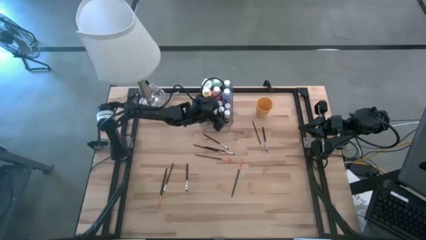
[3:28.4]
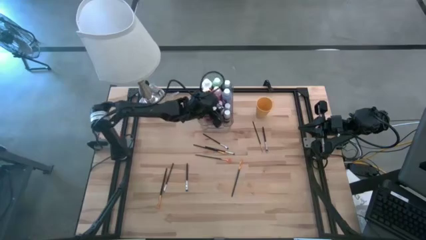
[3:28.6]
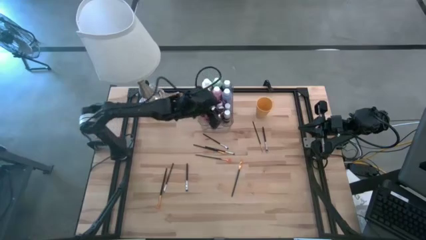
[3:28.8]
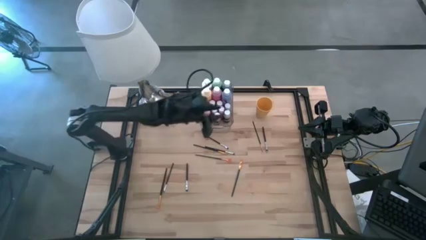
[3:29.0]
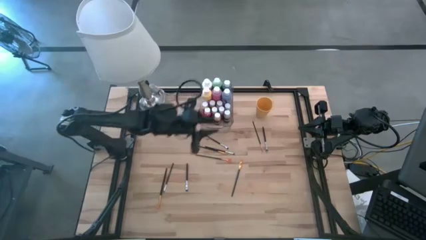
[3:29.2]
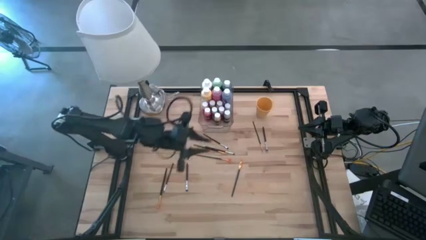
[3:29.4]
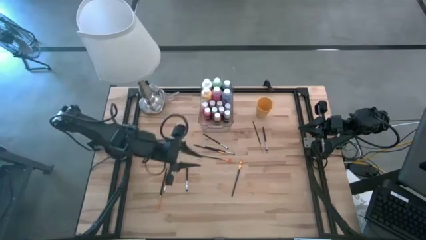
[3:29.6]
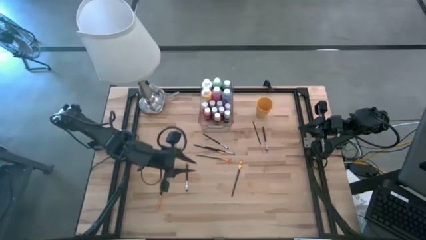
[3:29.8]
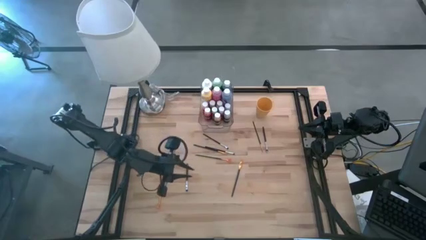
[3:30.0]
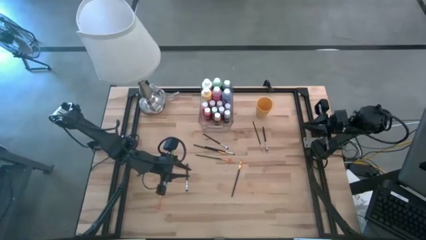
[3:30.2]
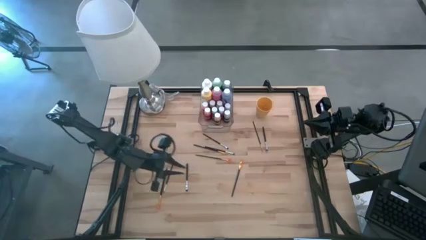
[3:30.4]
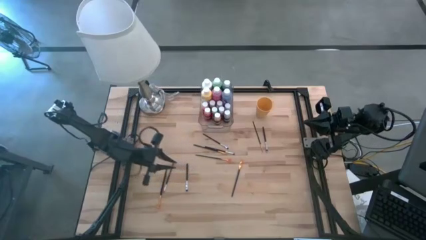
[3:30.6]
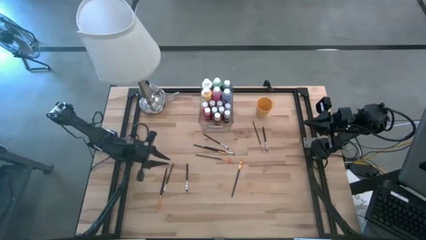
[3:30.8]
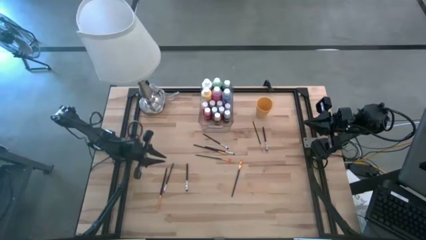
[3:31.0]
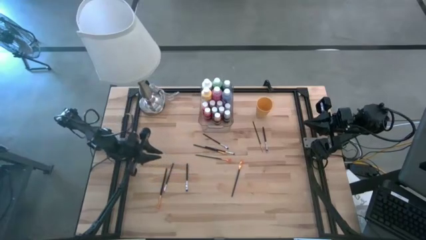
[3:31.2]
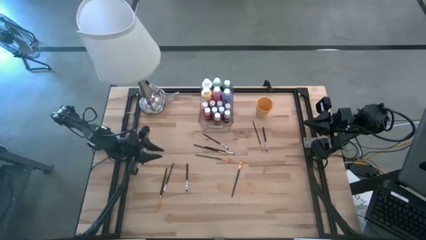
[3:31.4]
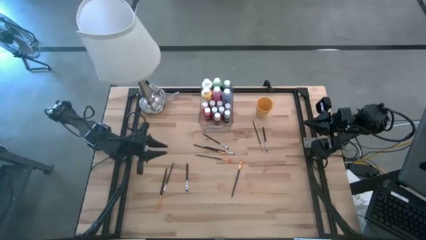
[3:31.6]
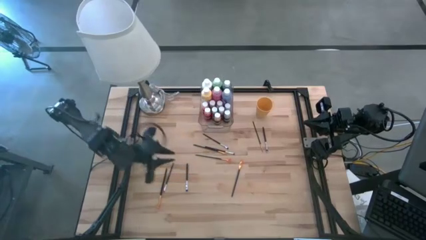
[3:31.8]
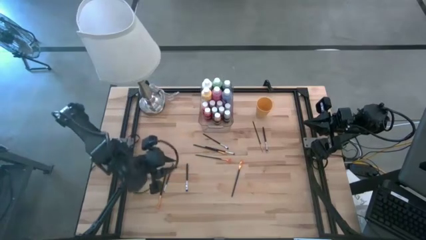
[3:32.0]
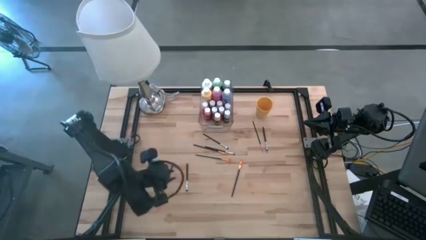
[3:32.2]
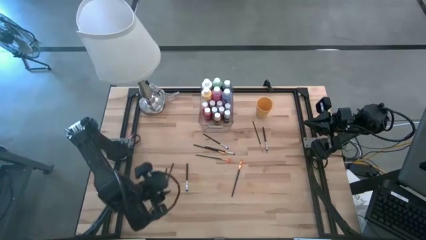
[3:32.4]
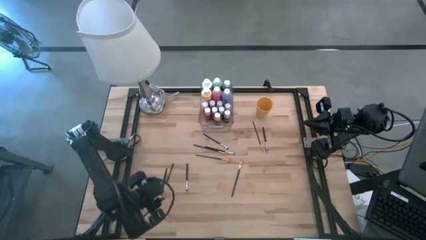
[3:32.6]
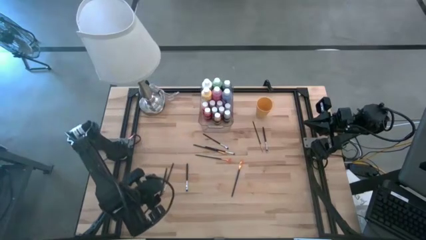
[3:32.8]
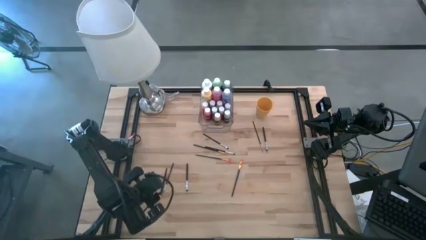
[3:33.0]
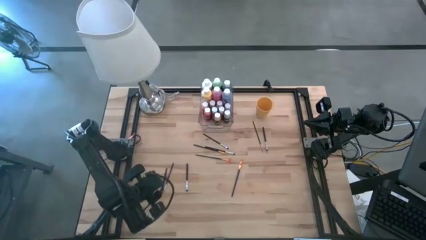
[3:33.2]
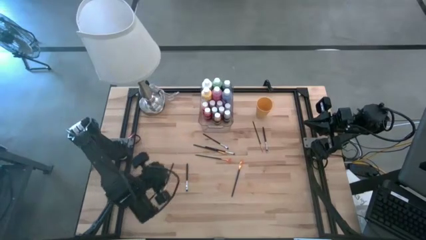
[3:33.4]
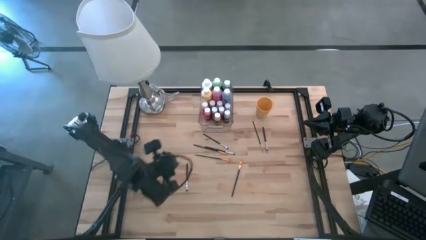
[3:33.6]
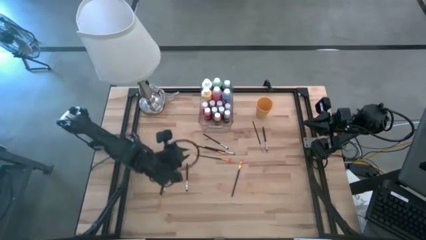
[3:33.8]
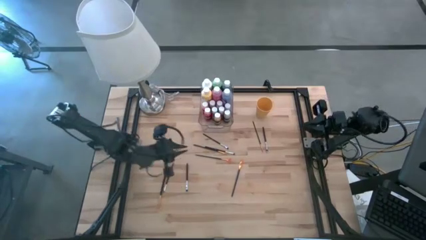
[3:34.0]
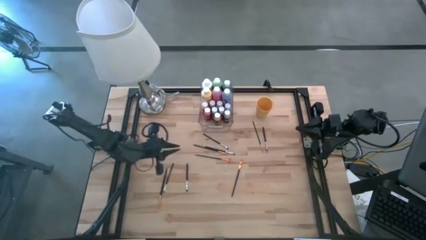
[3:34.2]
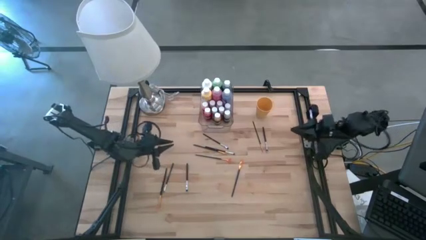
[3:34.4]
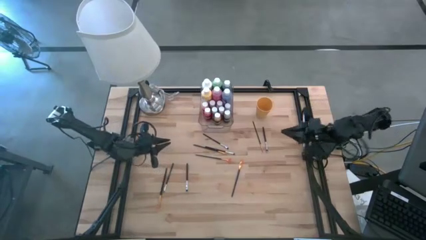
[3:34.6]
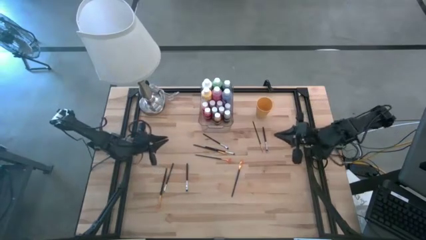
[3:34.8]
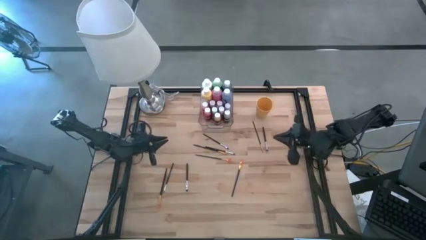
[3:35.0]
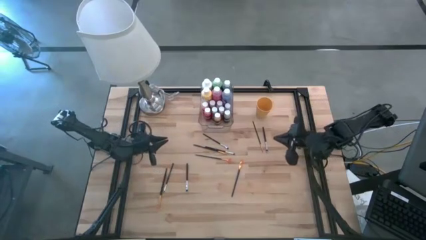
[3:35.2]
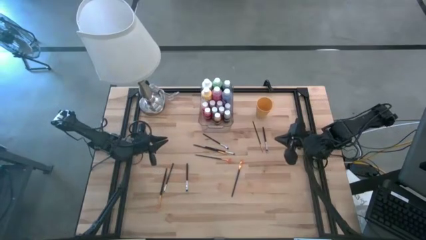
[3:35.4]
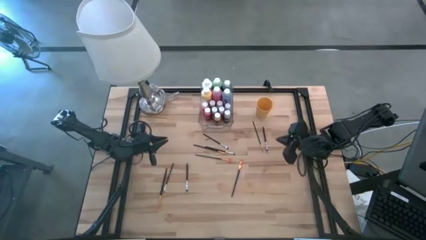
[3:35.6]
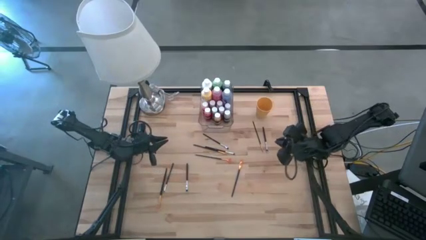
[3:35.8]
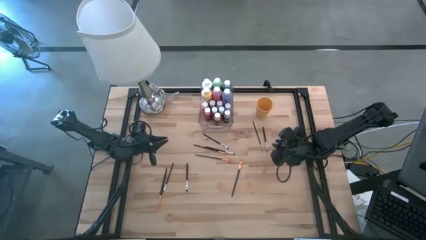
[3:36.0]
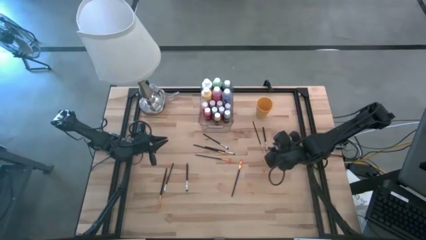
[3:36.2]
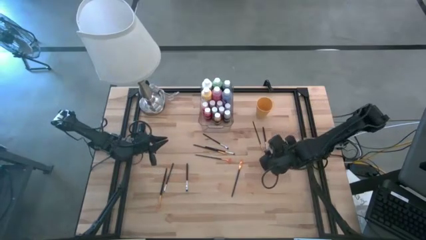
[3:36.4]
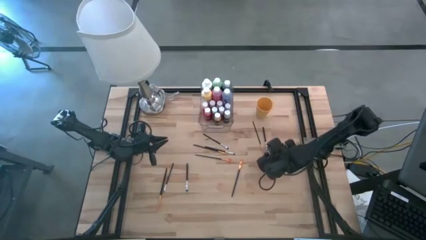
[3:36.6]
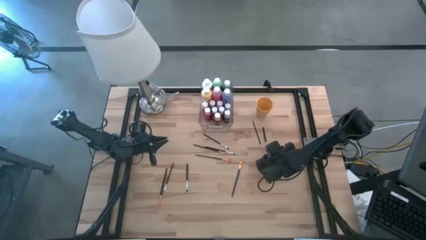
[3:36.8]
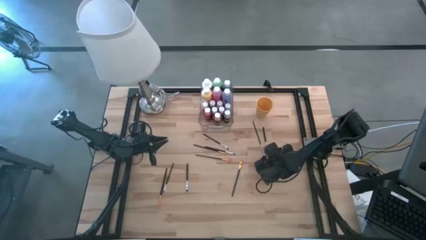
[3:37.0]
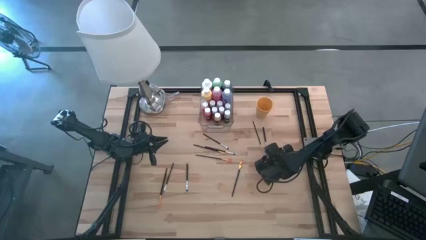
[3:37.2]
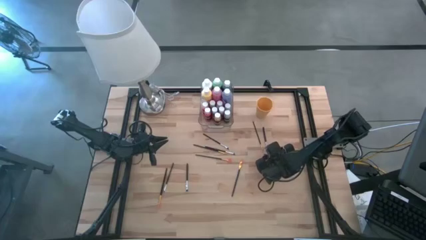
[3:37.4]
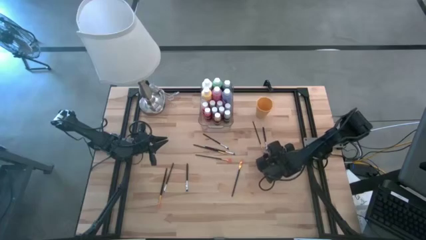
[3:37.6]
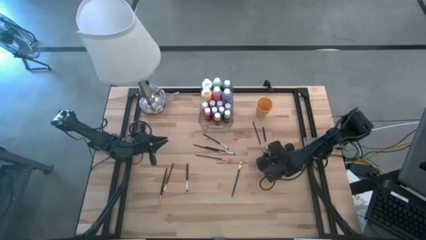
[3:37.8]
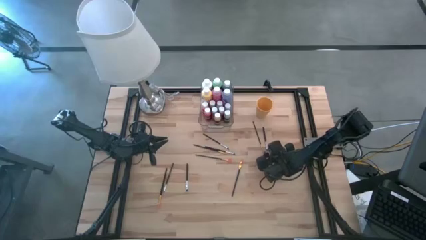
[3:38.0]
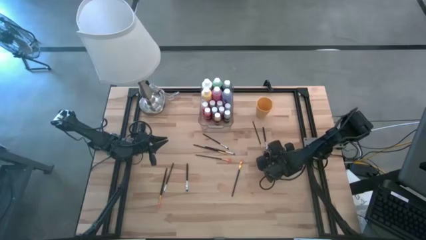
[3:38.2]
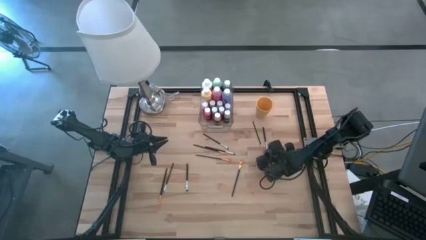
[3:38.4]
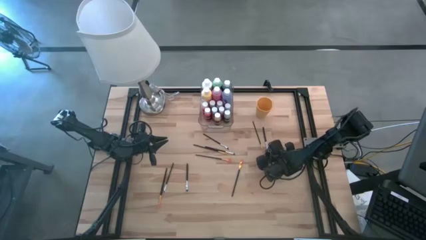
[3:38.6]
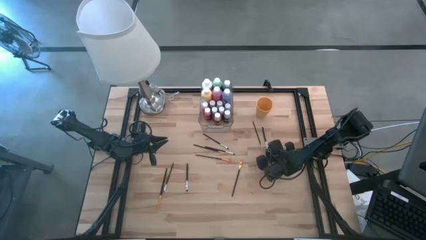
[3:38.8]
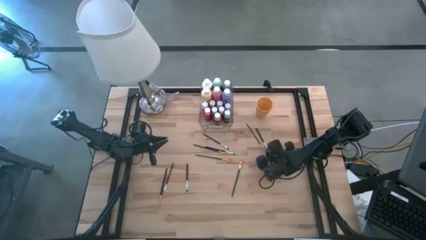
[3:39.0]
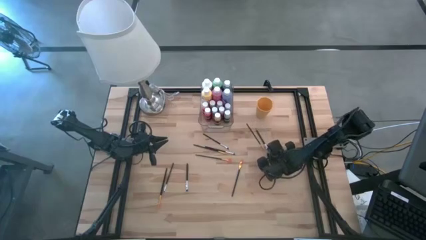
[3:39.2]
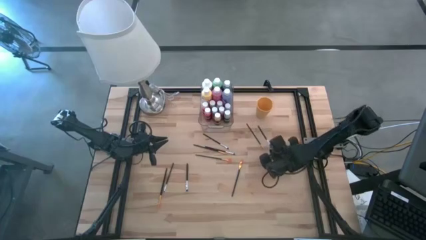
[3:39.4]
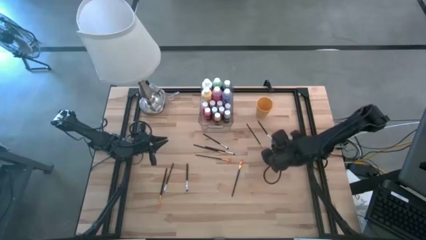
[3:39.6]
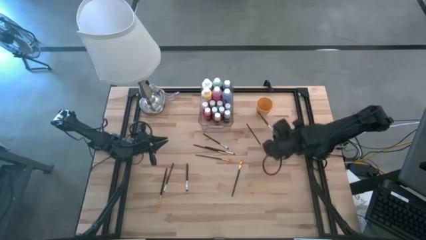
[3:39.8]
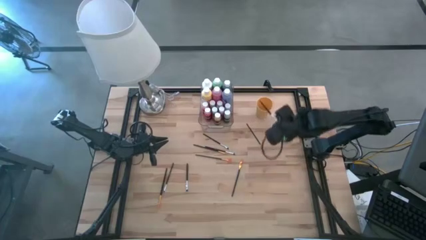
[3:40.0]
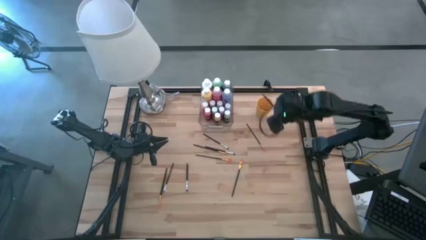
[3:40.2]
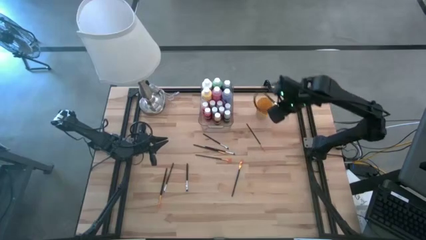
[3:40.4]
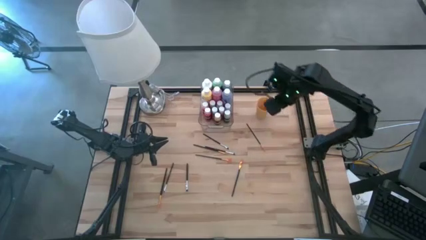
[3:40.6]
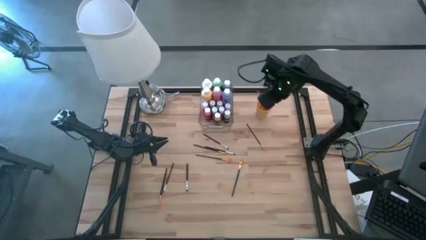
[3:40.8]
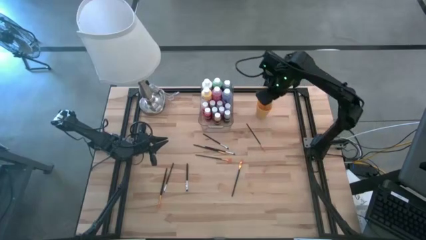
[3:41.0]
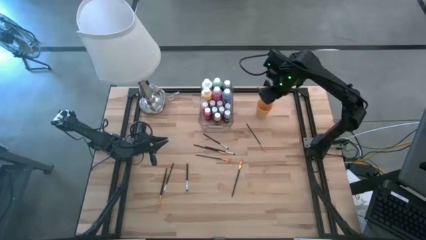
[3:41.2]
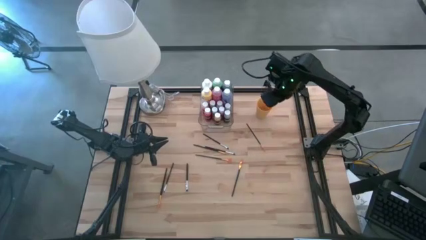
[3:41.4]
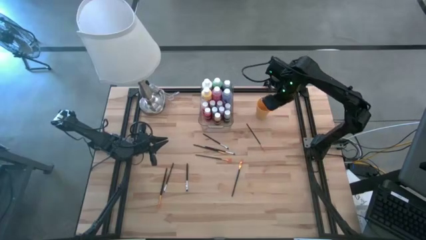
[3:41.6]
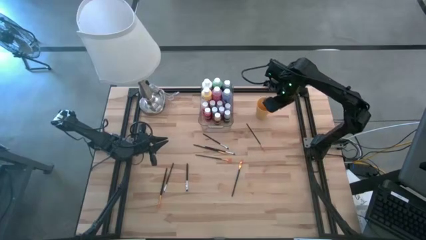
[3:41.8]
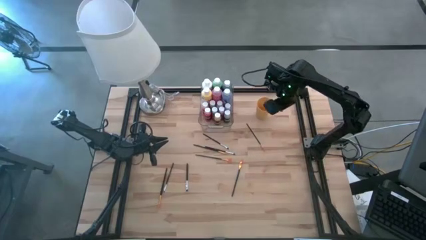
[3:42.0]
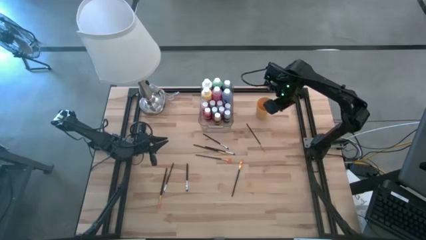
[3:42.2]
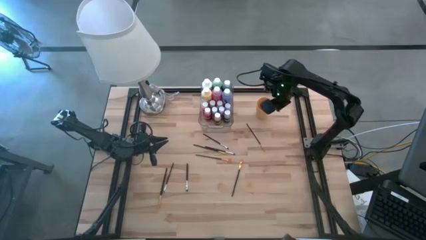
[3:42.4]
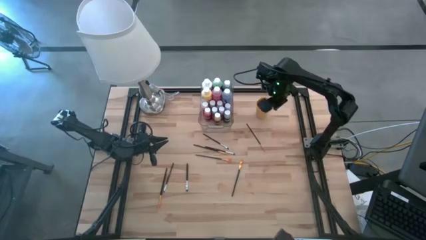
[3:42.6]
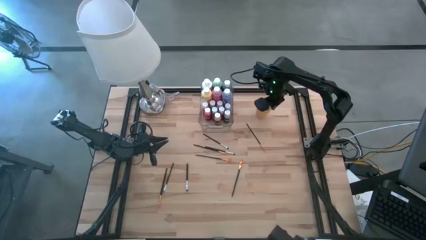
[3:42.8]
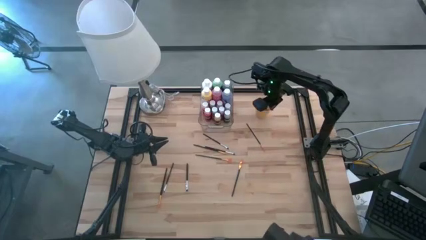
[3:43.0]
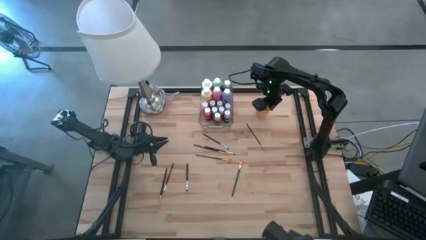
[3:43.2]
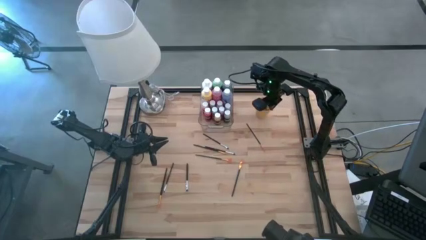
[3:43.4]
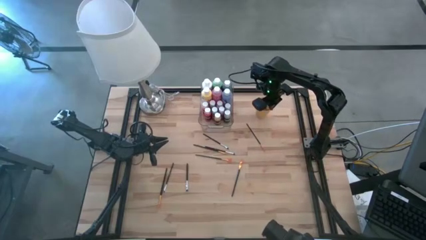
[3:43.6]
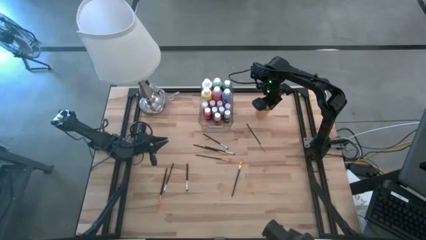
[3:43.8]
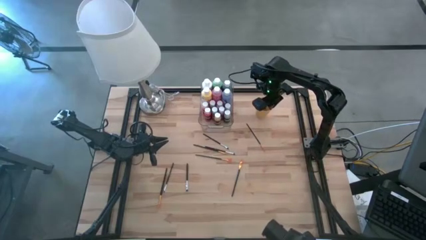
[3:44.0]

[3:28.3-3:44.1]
Task: Pick & Place Paint Supplies
Put the silver paint brush into the cup

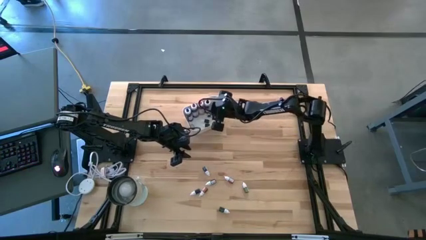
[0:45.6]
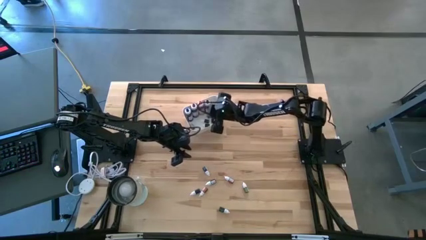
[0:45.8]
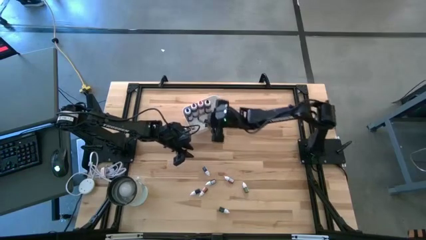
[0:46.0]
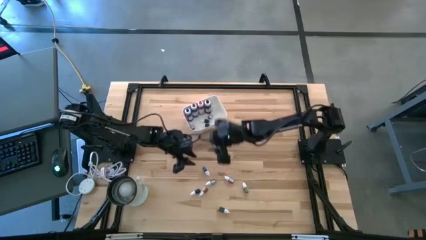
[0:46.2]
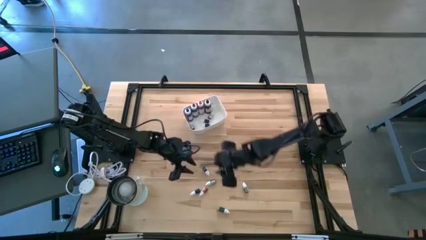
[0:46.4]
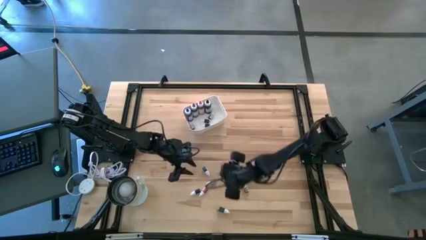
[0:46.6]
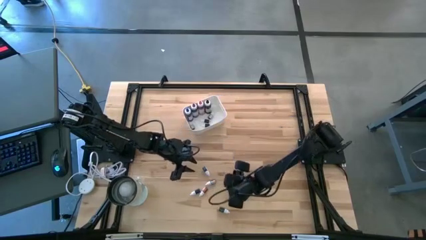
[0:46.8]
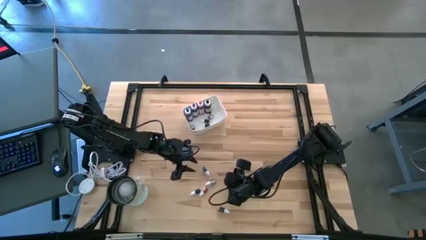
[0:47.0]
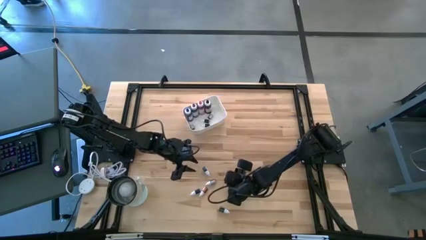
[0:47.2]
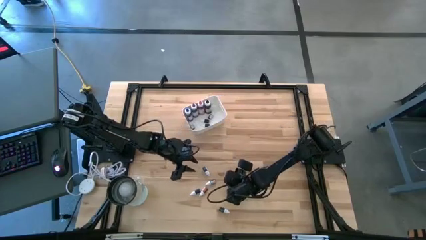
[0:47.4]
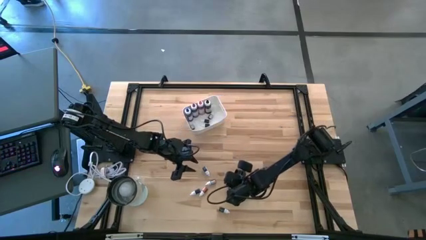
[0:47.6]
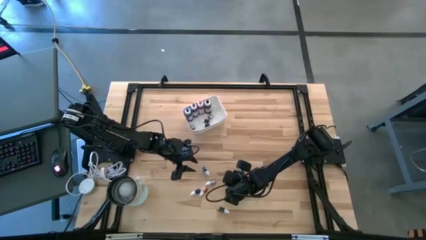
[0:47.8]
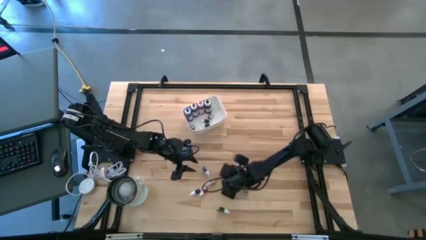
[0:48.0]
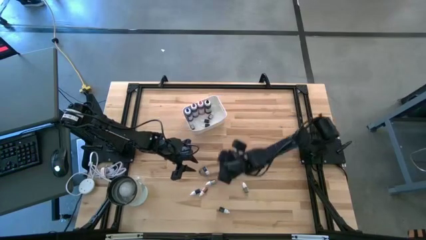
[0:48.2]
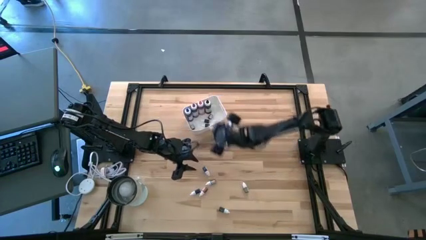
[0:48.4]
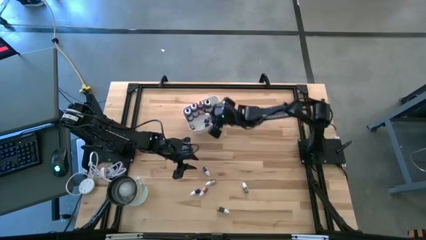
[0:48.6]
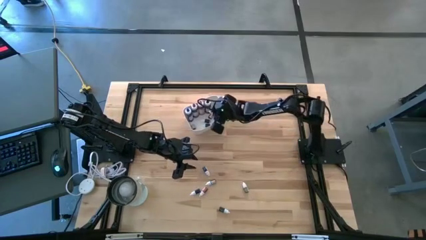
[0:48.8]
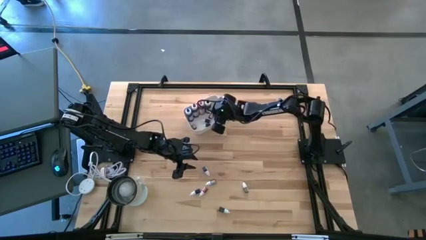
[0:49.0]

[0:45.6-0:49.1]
Task: Pick & Place food coloring
Put the small red food coloring bottle into the white bin
